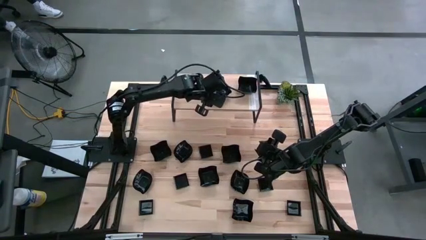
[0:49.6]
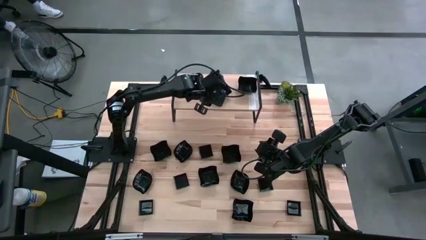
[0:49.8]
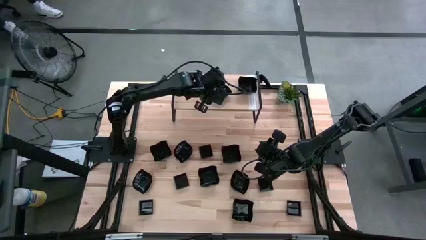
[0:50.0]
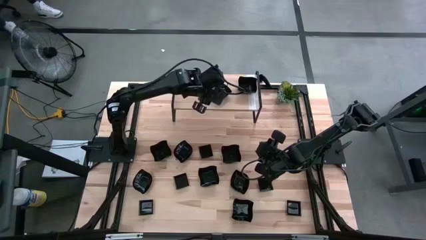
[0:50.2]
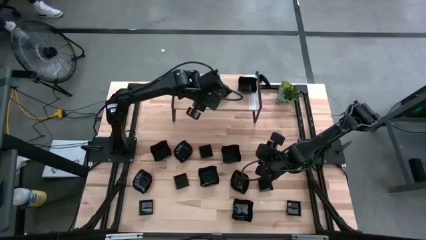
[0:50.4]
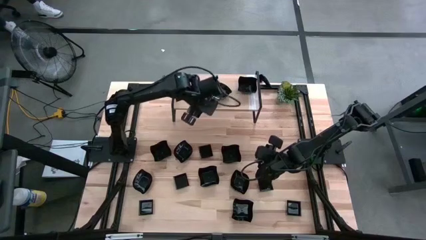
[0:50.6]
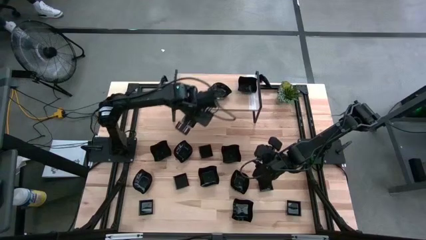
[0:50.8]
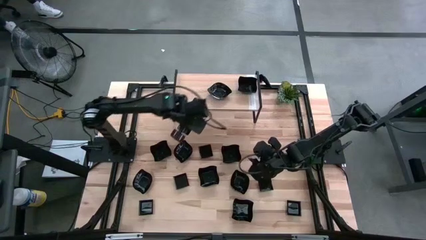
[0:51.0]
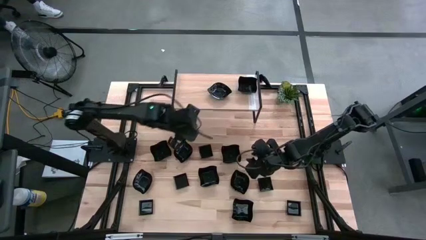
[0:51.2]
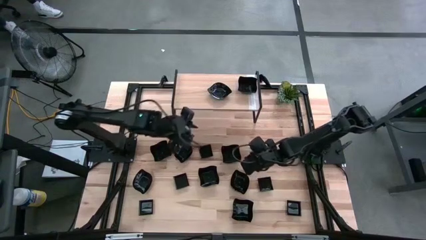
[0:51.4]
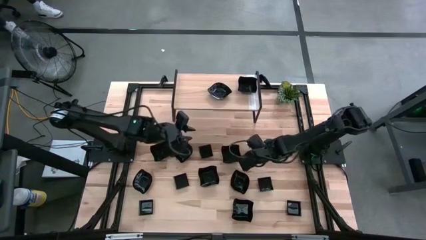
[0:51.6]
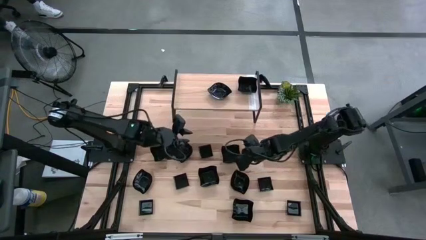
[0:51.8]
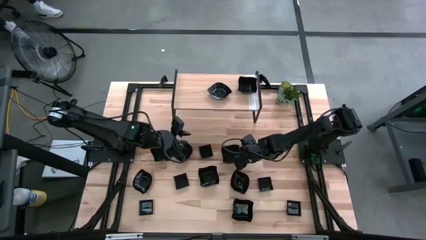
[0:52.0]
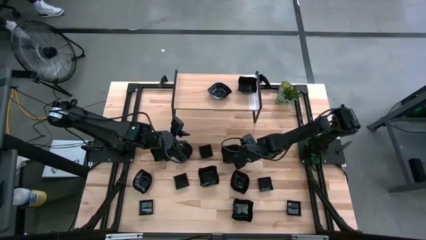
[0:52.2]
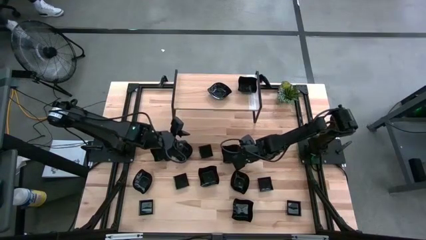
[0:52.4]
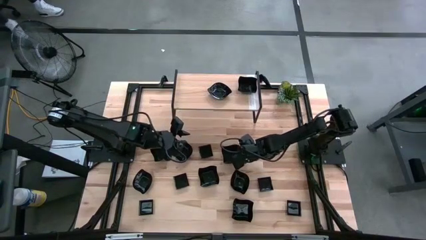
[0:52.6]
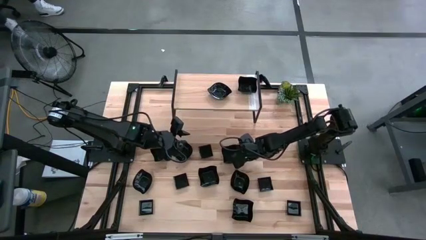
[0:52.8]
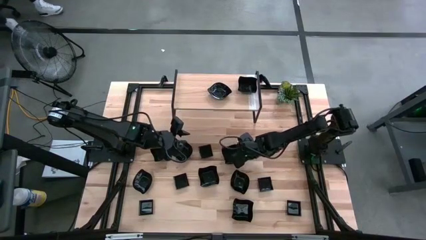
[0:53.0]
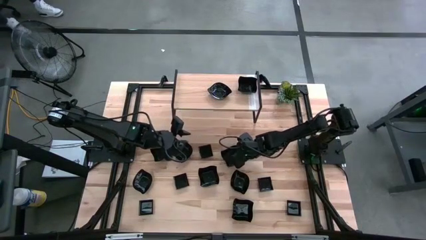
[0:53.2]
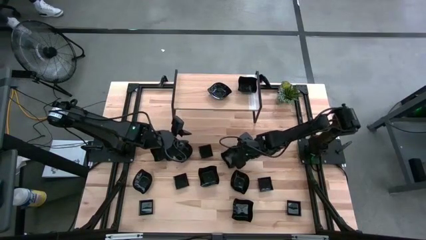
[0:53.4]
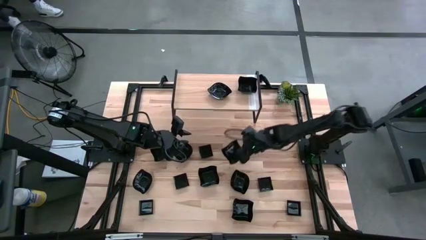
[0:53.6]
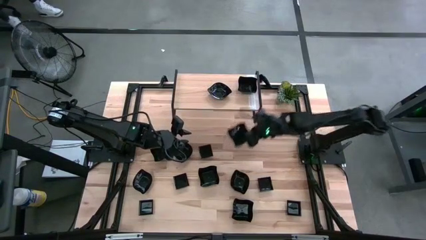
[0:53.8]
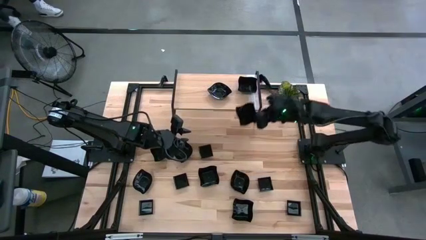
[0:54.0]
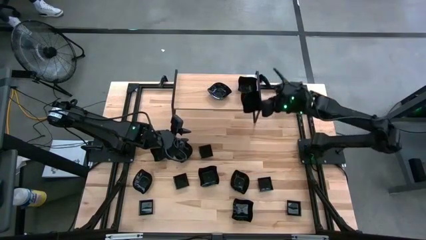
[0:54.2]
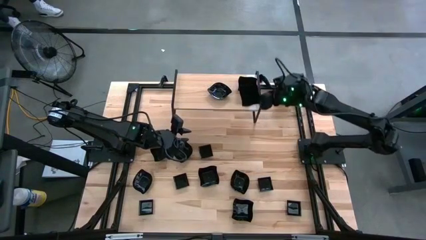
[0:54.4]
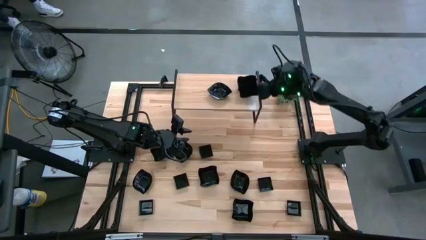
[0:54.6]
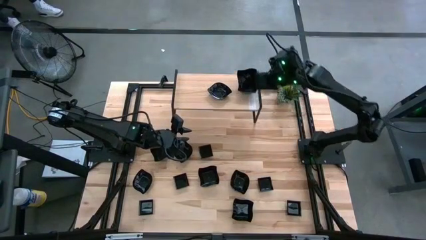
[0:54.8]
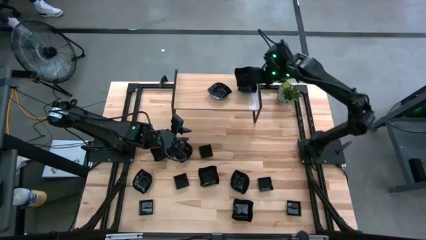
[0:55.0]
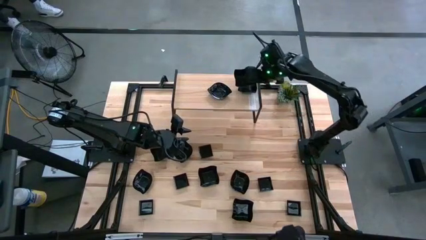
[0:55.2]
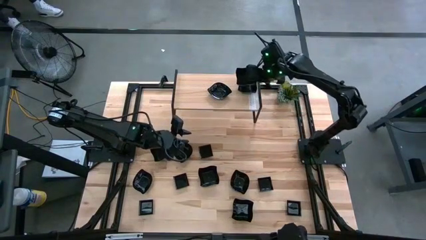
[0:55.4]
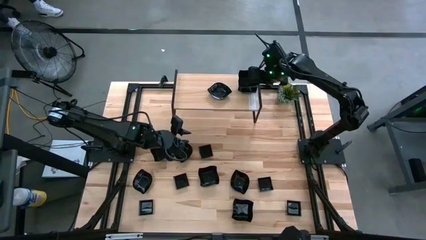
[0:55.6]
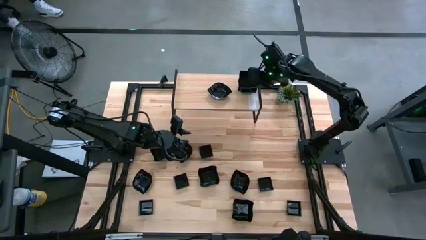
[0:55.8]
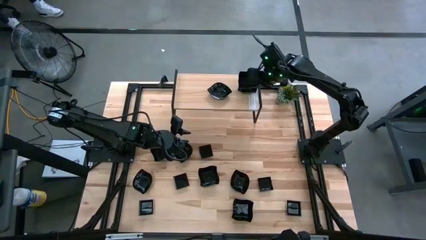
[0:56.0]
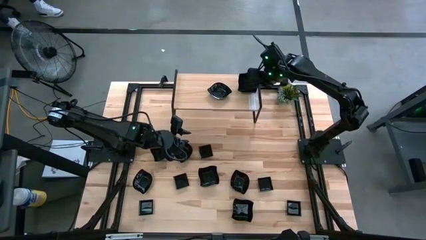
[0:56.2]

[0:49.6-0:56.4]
Task: Pick & Place Mini shaped plates
Stack the distorted square plate on top of the other distorted square plate on the shelf

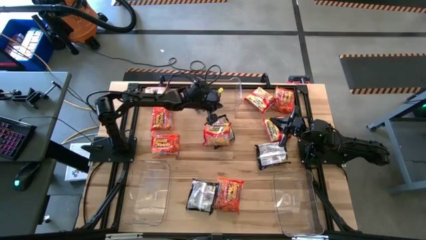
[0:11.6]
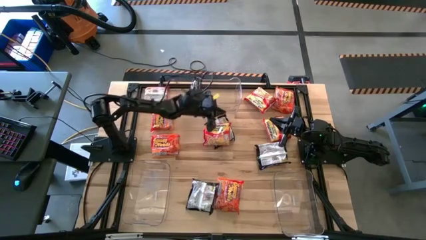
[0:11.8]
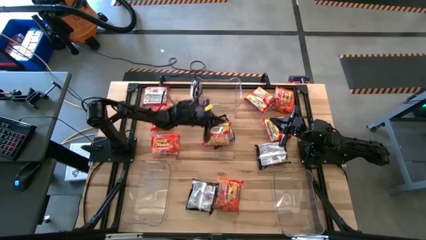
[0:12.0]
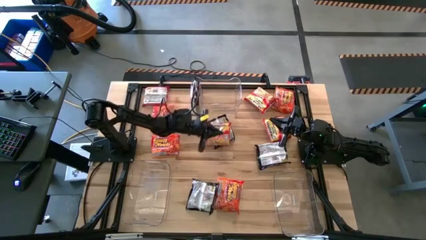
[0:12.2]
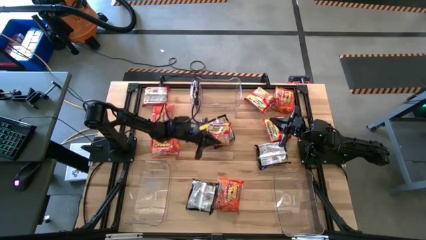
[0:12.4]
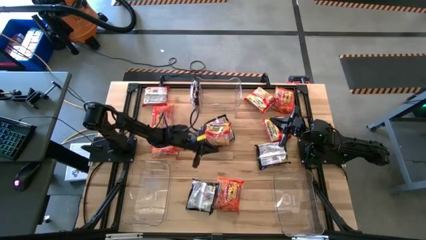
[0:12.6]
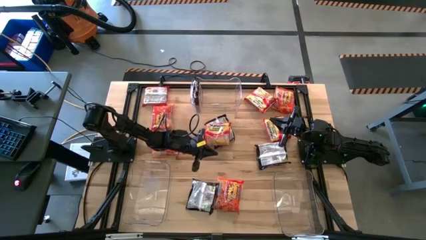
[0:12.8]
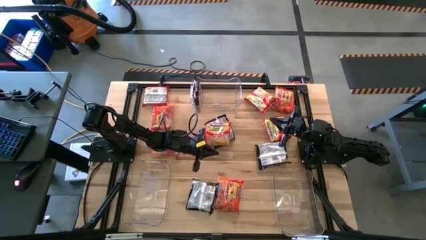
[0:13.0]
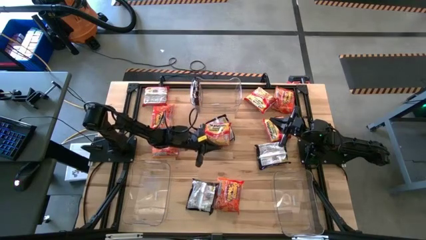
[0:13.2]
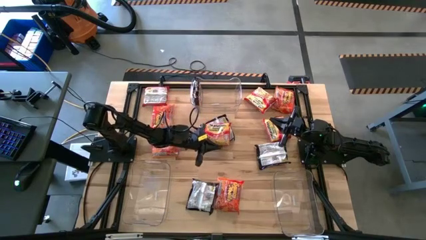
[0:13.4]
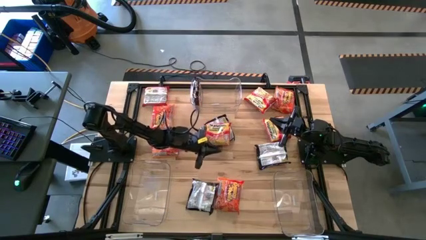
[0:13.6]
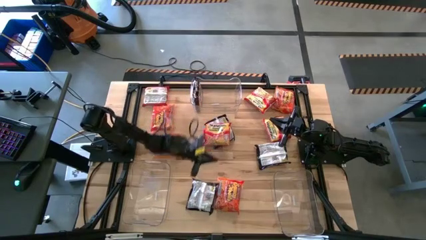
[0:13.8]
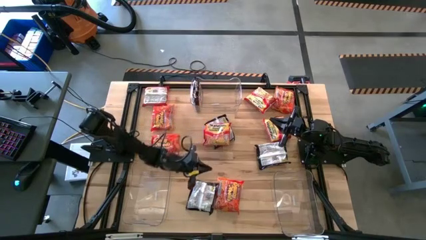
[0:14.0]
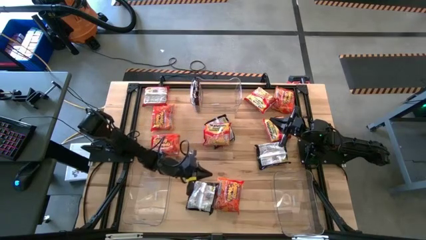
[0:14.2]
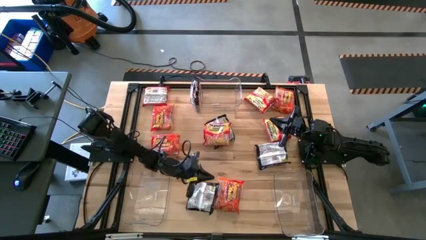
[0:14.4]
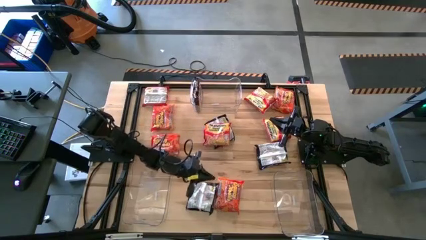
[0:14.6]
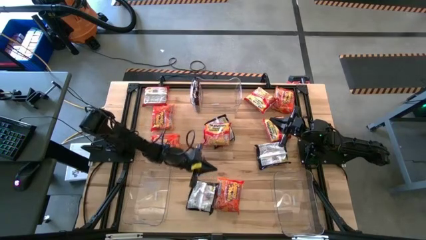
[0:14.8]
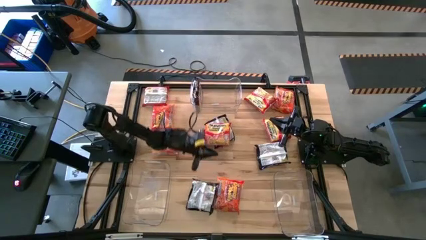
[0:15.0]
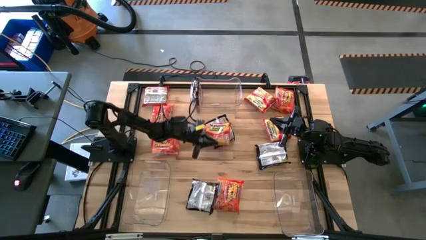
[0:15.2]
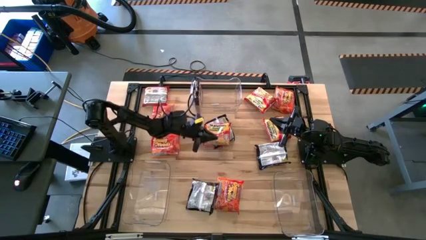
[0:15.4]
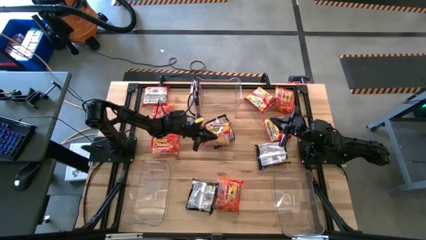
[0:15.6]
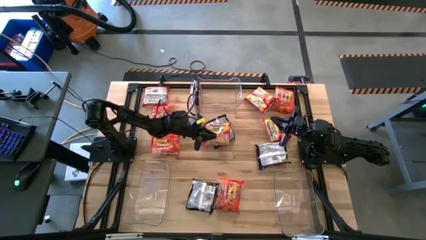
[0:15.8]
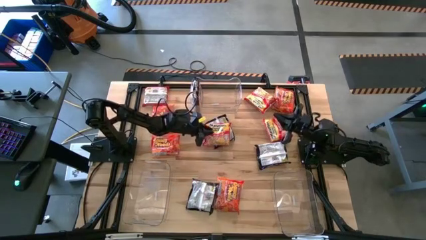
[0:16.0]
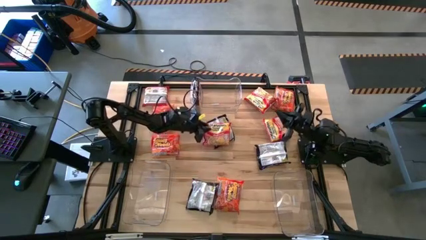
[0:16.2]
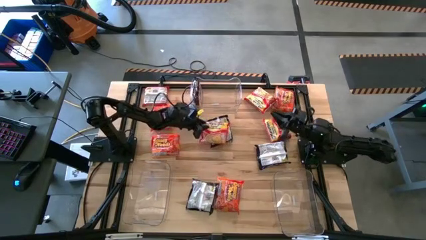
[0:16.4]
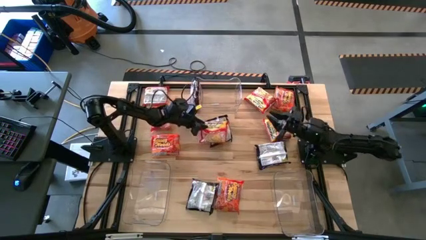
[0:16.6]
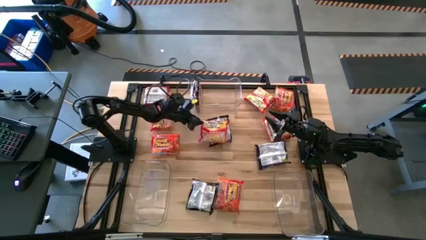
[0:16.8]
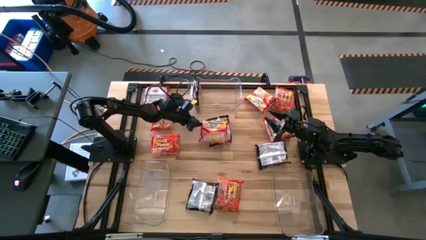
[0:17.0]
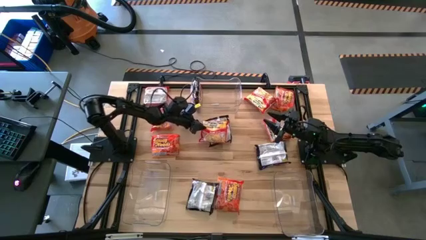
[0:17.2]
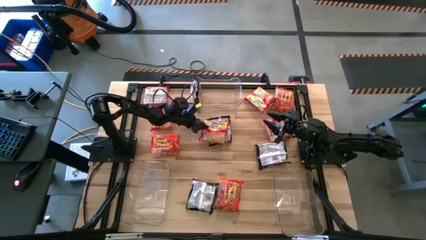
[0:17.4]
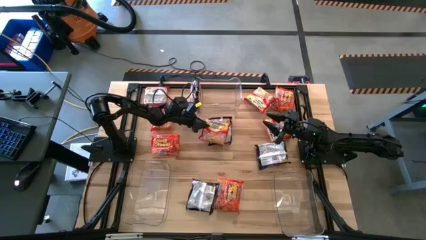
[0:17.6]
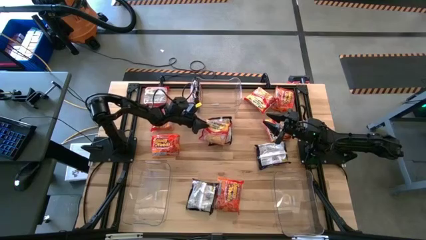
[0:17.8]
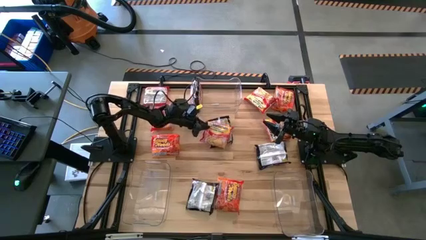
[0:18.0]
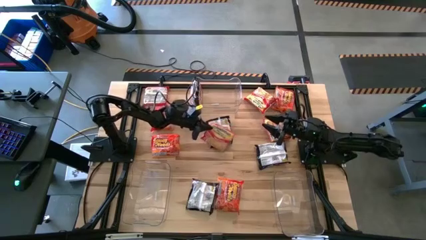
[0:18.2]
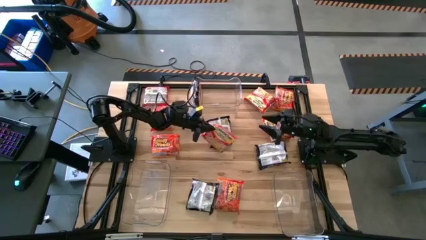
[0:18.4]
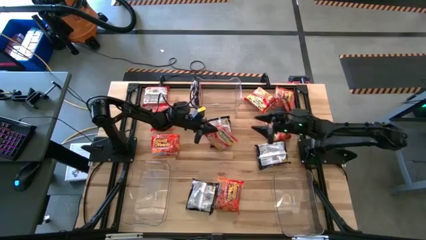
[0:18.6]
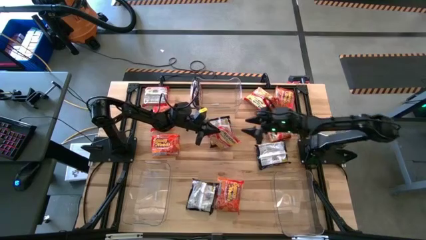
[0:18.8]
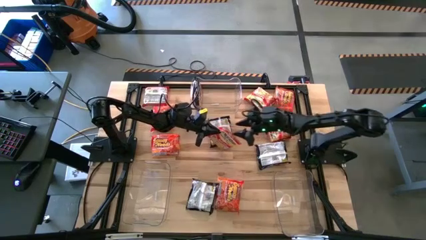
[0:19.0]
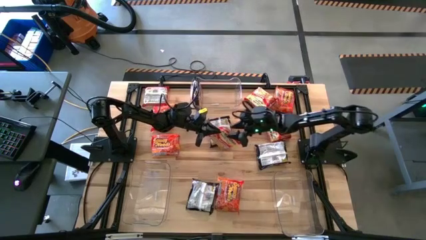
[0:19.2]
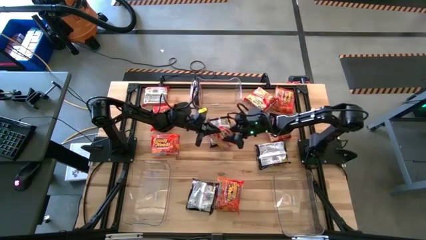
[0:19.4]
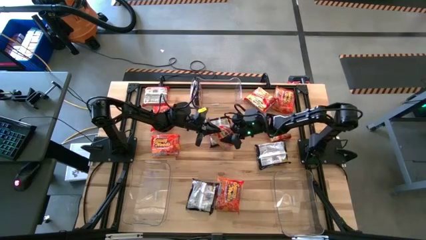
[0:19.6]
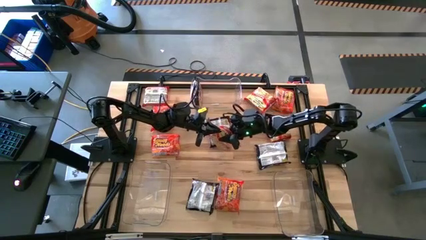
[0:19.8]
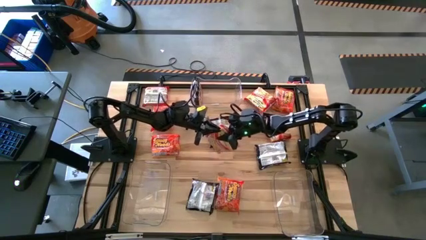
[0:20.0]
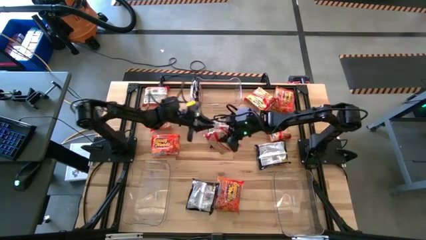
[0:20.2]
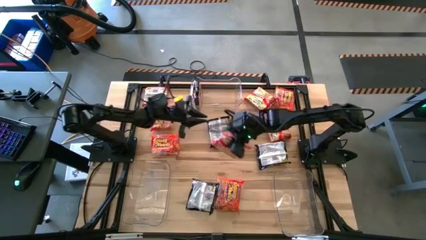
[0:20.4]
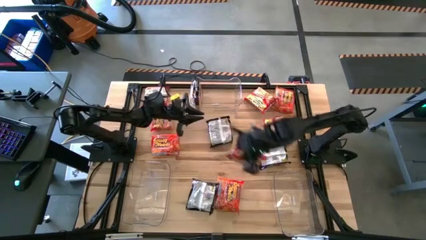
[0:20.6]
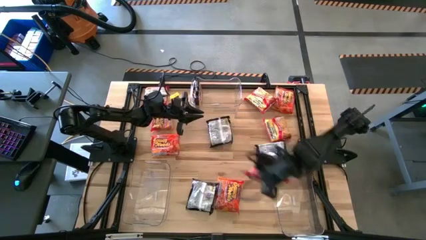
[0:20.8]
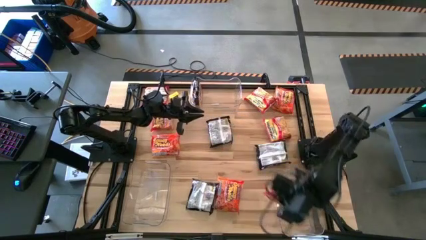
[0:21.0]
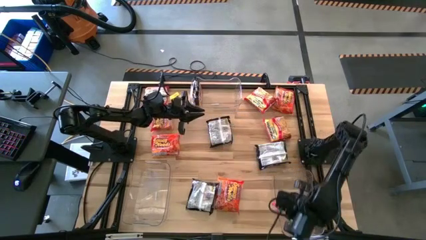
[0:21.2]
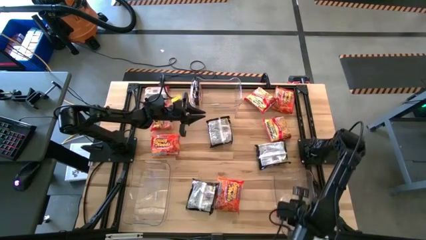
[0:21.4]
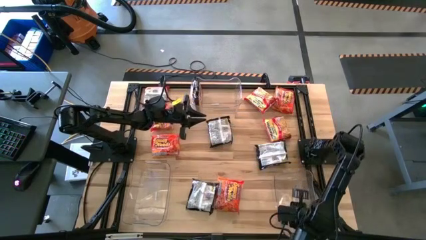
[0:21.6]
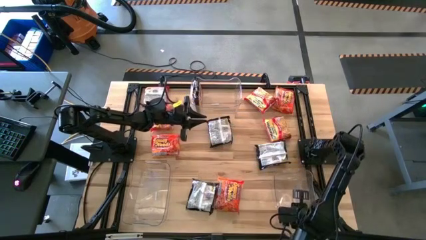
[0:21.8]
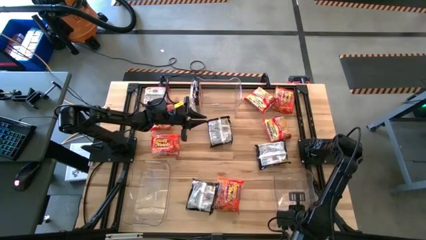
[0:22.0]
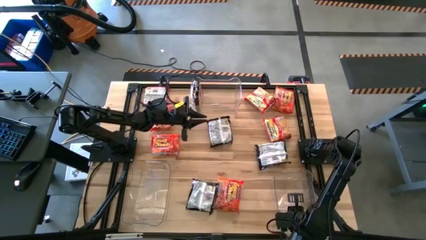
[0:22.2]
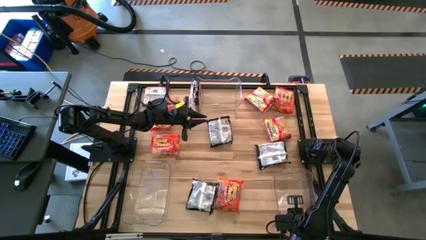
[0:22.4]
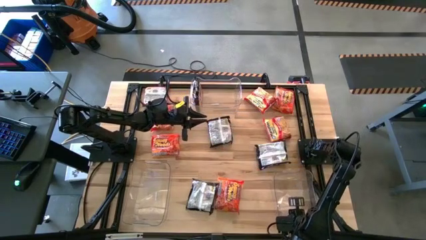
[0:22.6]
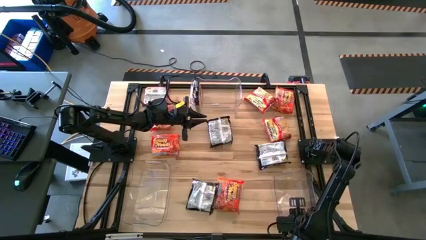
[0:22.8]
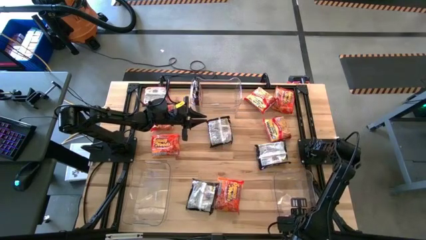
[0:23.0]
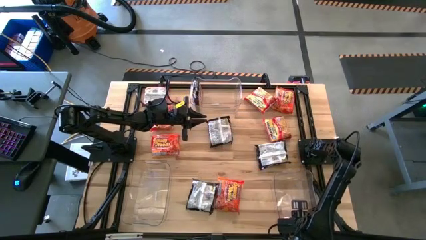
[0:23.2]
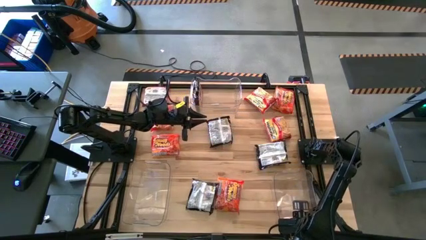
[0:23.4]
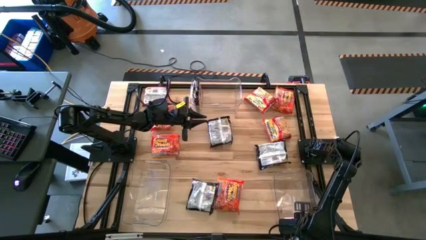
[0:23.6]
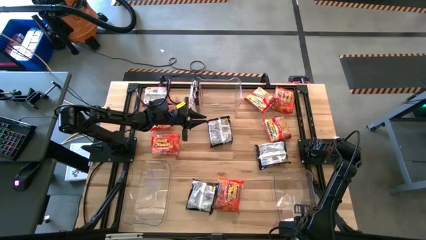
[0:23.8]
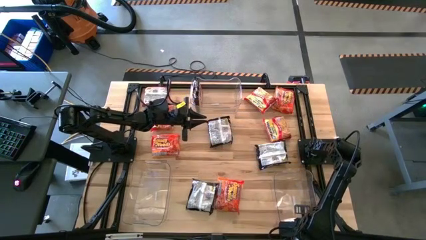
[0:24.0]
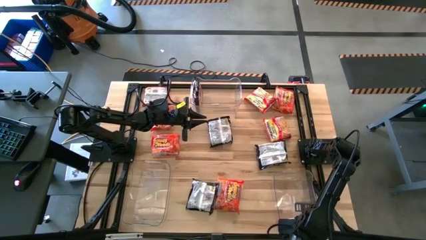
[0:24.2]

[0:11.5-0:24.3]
Task: Sort Maruchan noodles
Put the bottom red noodle pack into the bottom right transparent bin
